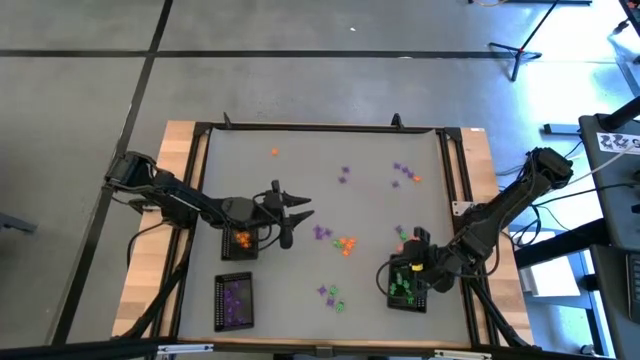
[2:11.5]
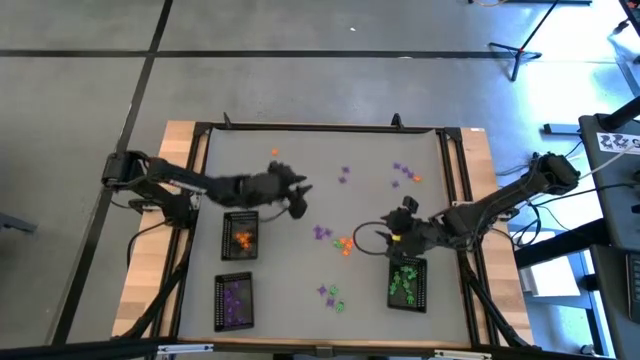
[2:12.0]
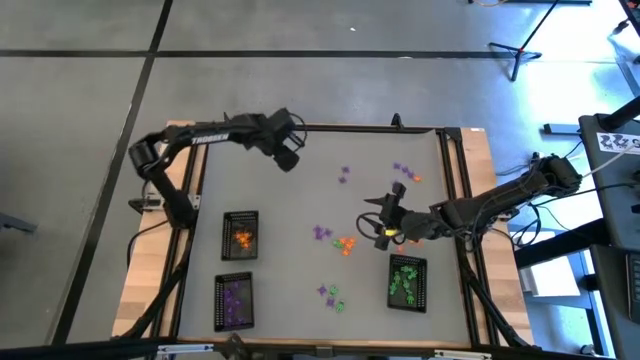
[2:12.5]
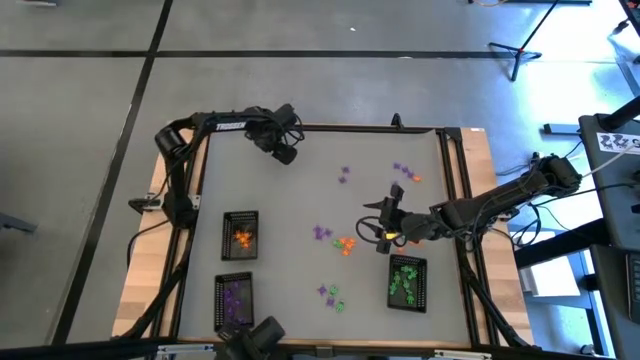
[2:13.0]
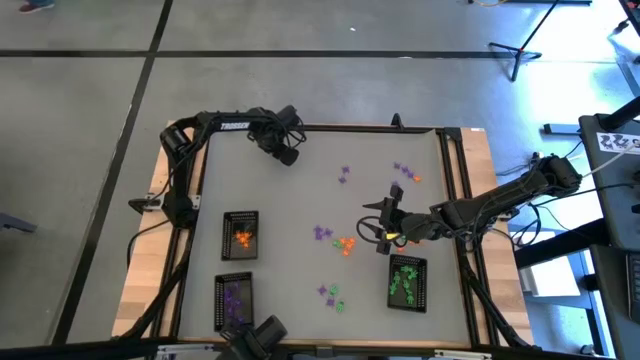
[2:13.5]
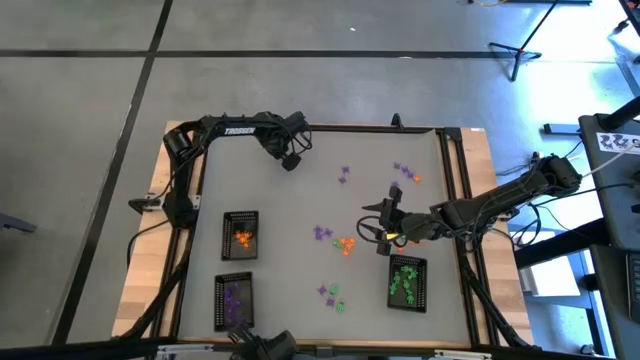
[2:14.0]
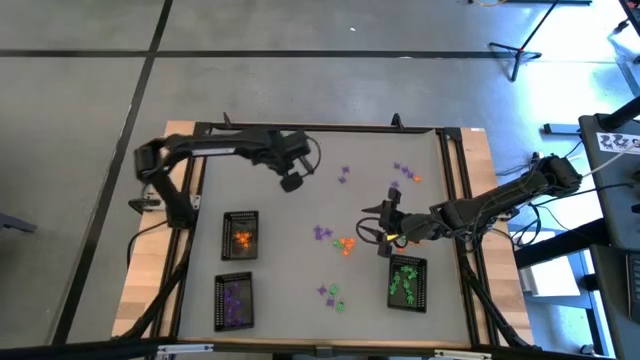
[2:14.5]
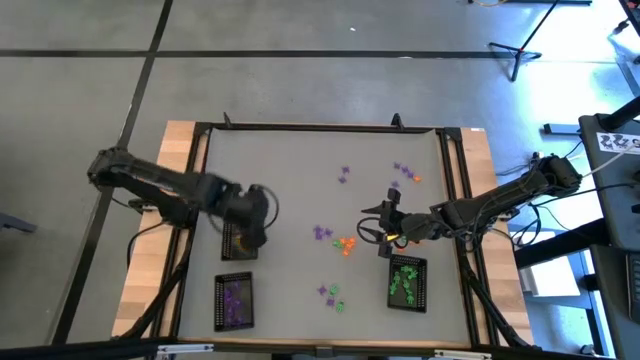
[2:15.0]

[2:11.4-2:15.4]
Task: Sort Halloween decoration
Put the orange spider toy into the top black basket

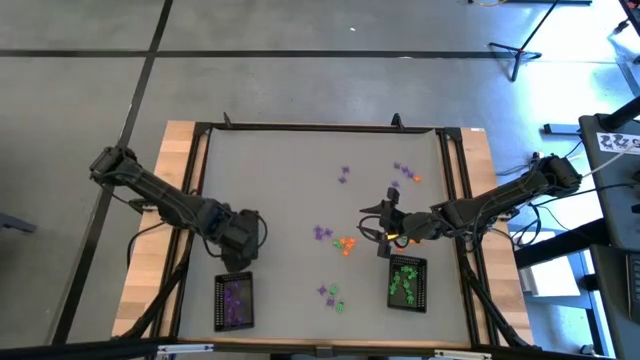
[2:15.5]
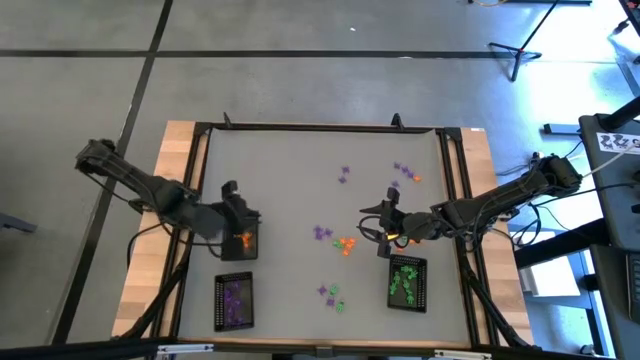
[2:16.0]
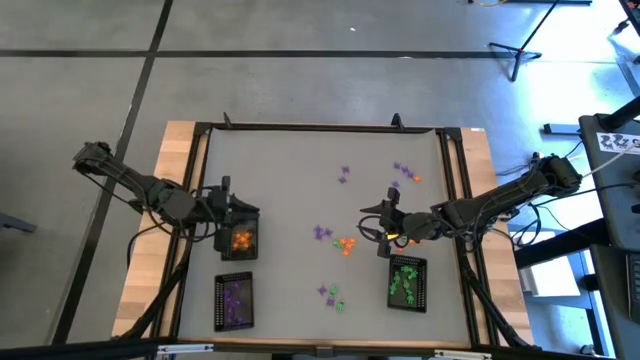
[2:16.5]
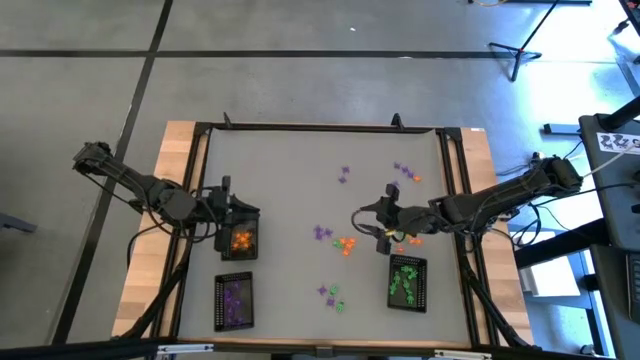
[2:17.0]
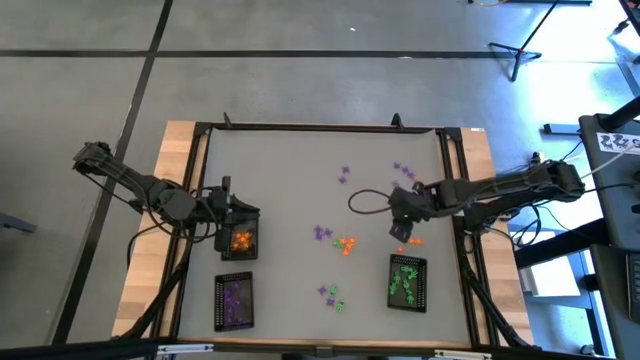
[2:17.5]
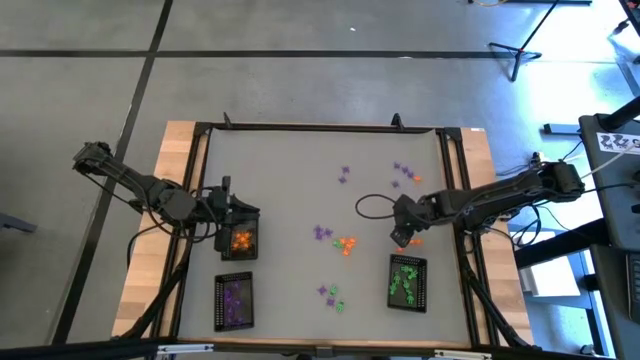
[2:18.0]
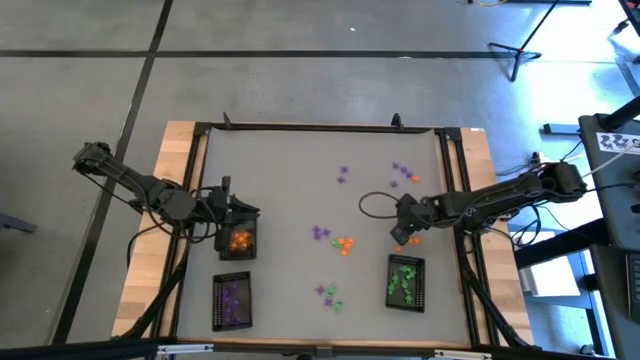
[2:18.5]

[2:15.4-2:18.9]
Put the purple spider toy into the bottom left black basket

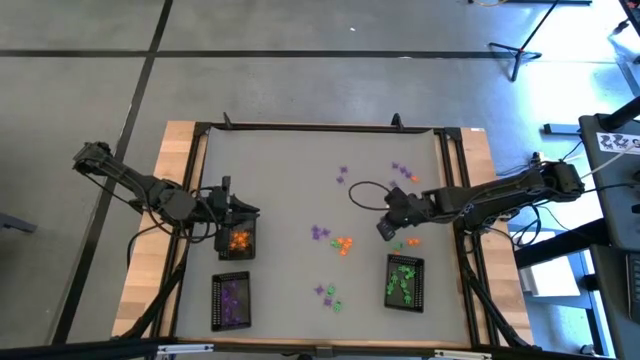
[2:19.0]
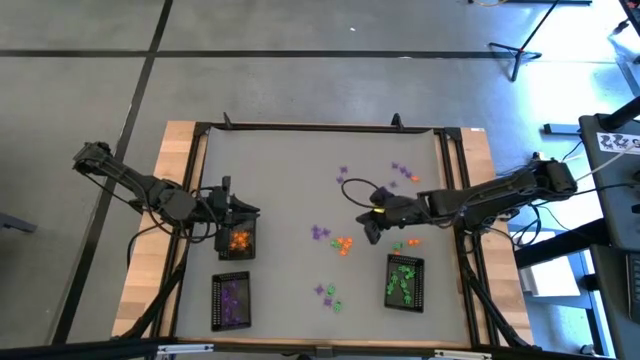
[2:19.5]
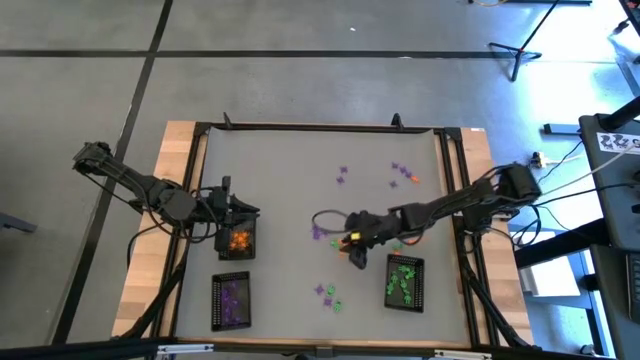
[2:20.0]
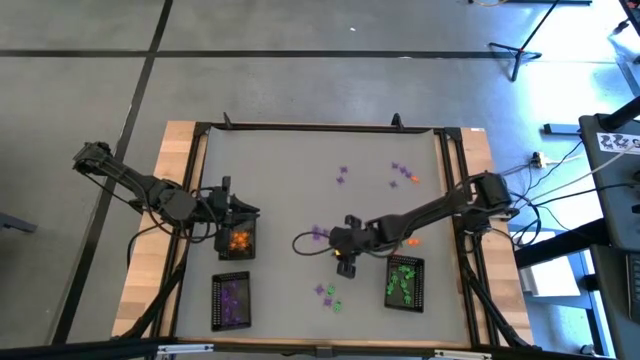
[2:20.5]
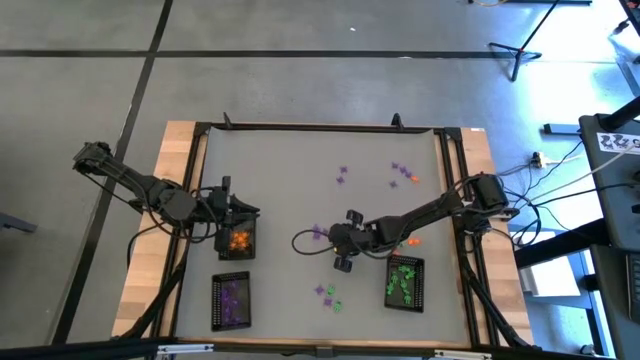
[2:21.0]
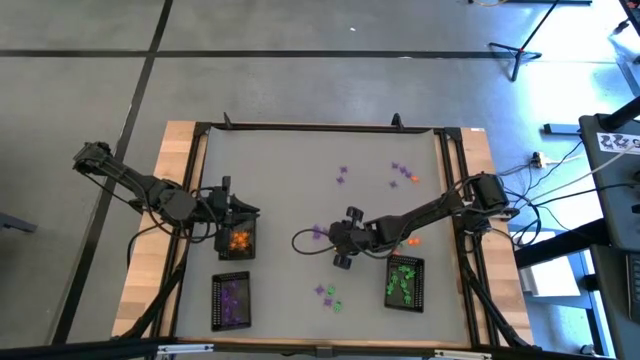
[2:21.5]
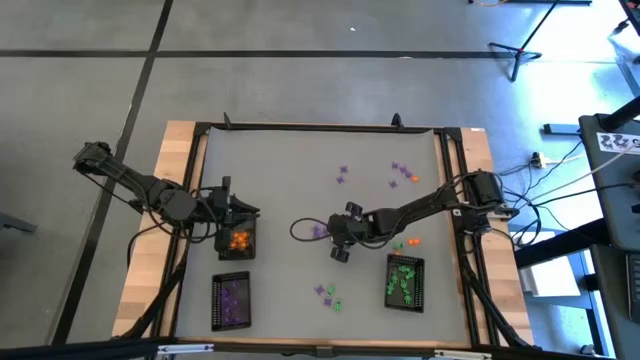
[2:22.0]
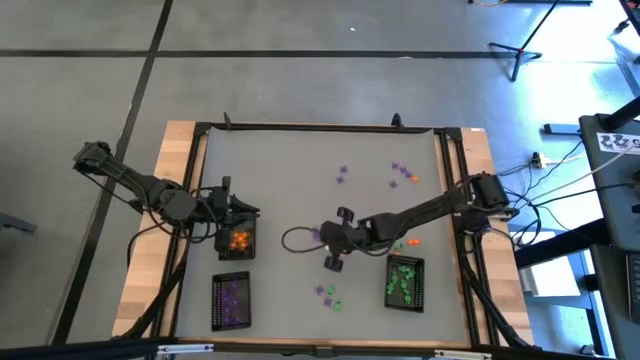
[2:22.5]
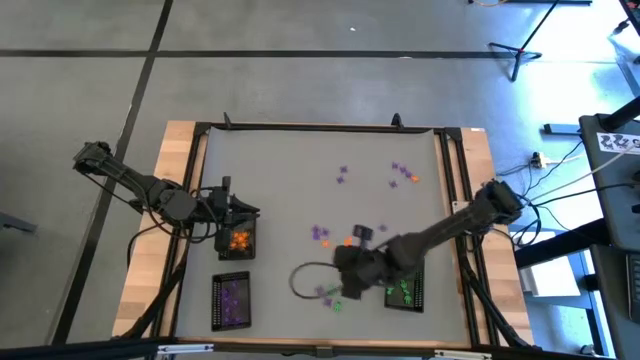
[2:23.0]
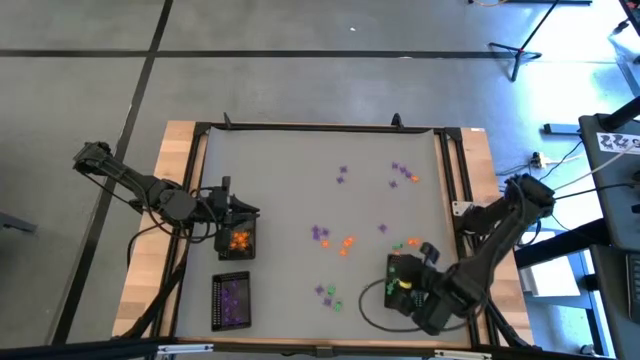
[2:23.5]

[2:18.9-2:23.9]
Put the green skeleton toy into the bottom right black basket

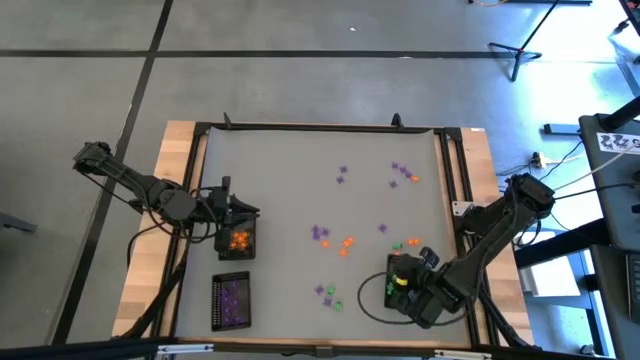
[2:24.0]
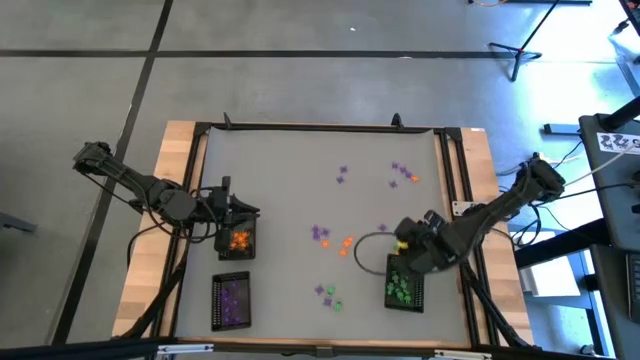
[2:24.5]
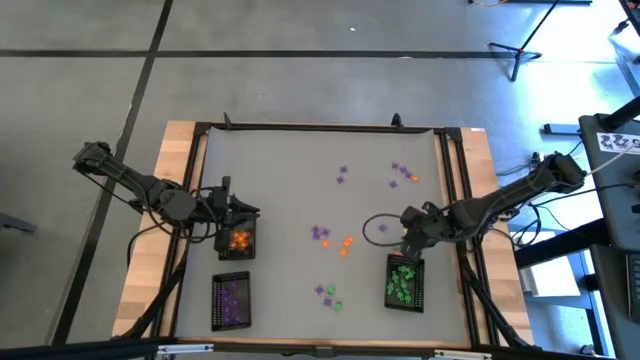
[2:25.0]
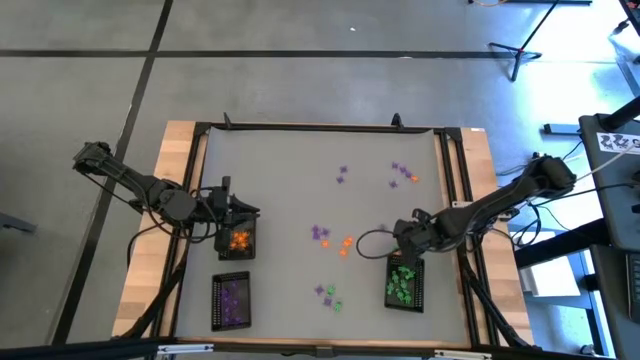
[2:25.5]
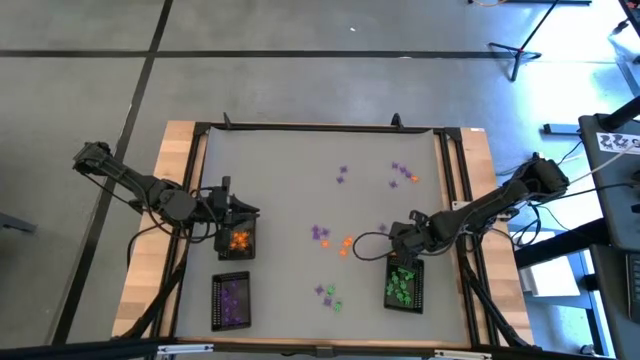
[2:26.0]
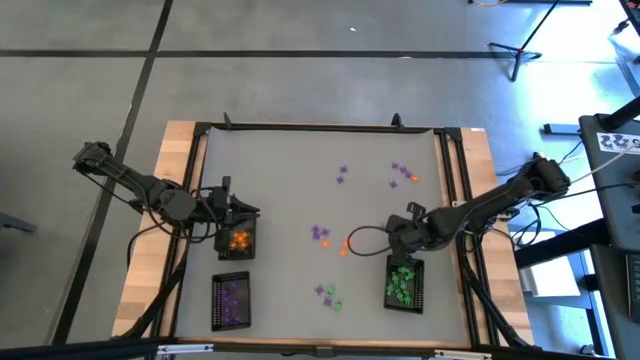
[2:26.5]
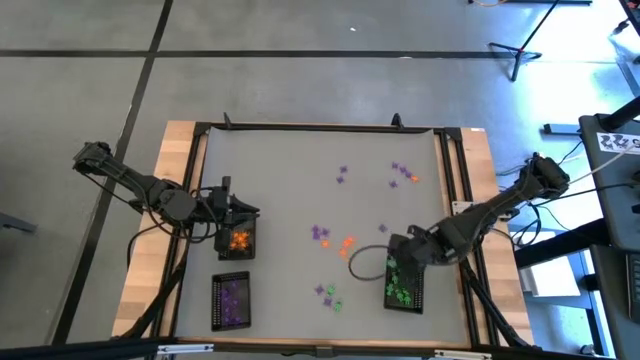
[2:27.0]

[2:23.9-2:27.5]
Put the green skeleton toy into the bottom right black basket

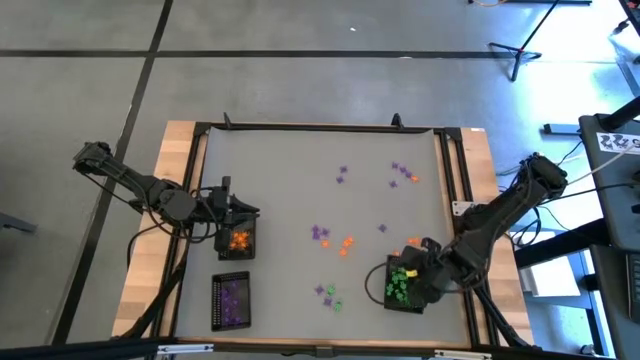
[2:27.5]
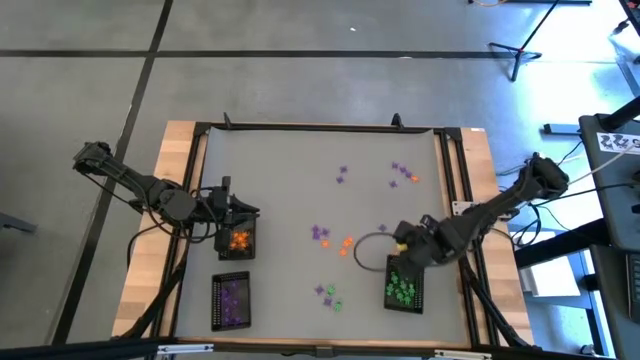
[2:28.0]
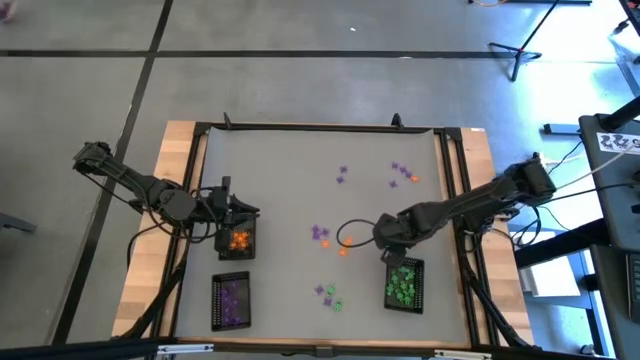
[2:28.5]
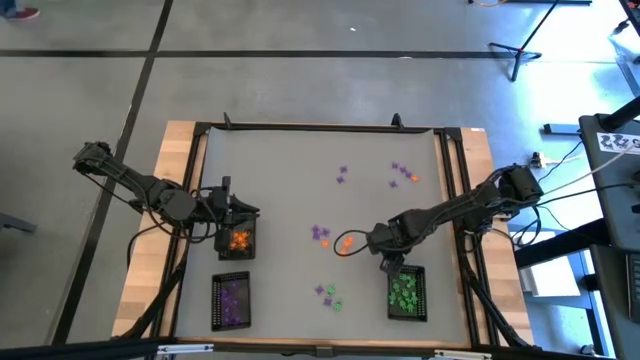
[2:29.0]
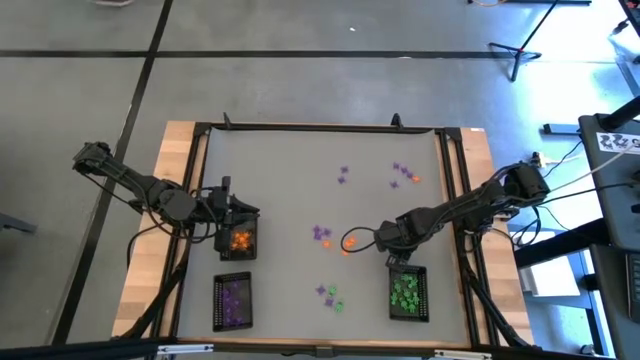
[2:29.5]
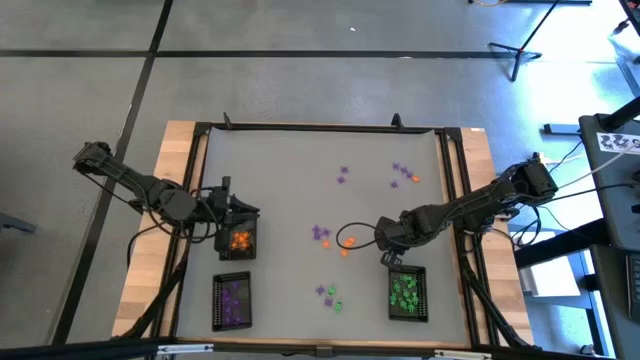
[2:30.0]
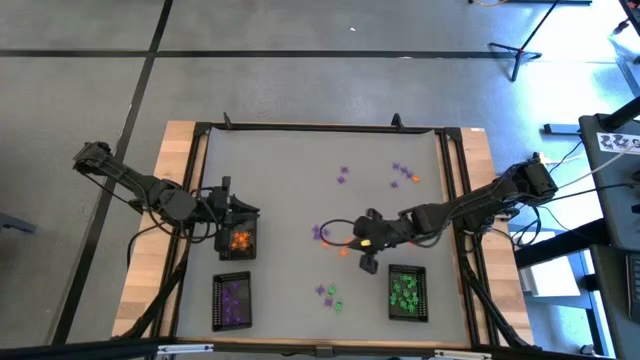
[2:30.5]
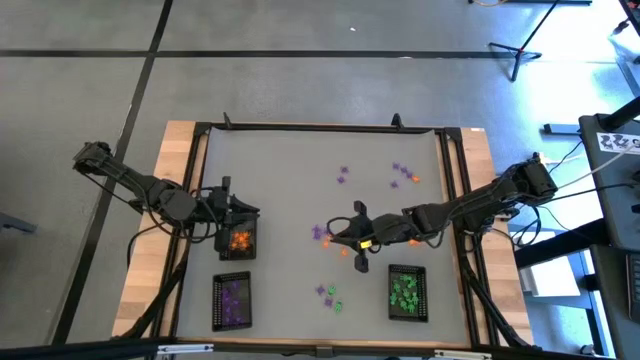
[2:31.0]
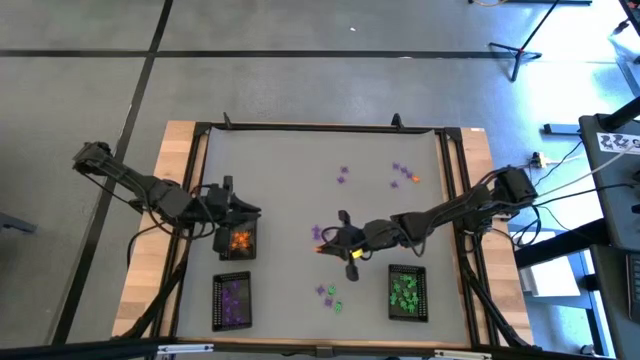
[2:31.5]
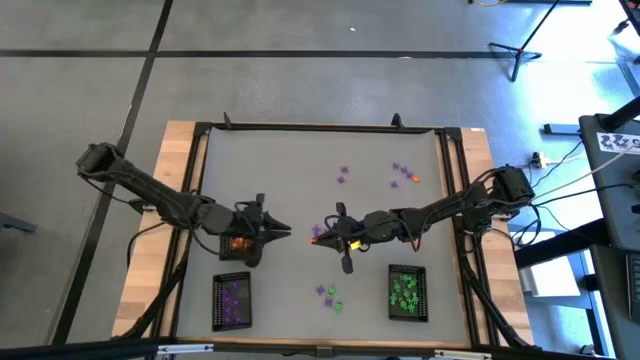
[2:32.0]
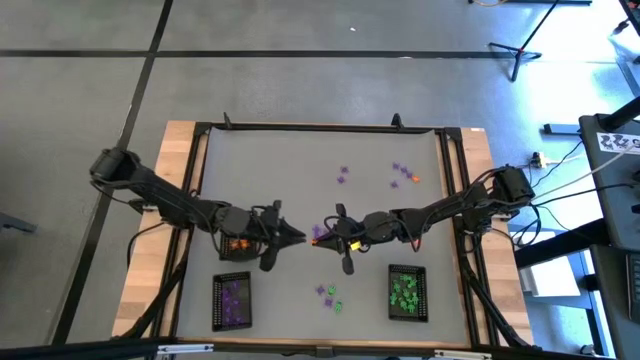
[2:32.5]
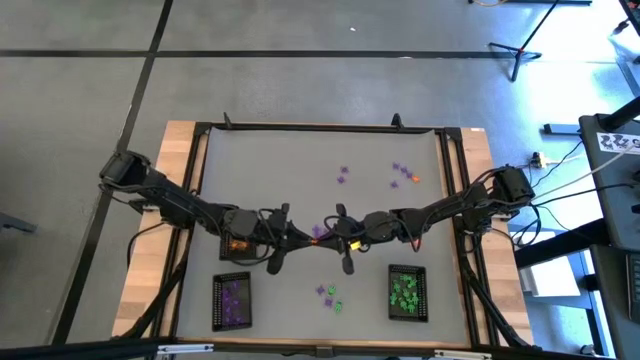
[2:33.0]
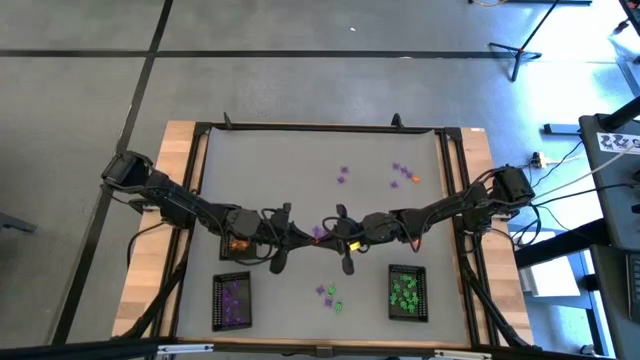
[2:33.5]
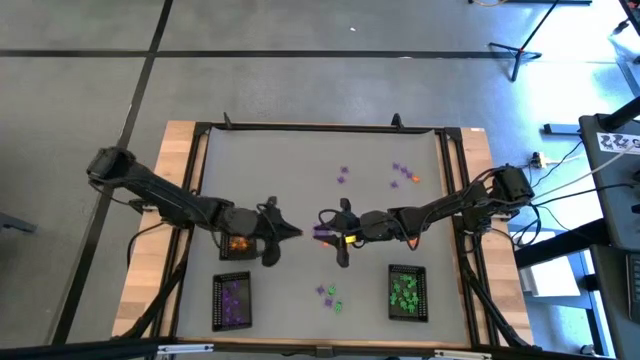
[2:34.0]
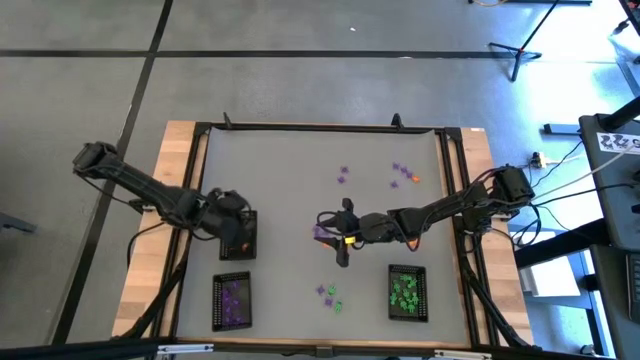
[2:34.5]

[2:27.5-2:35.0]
Put the orange spider toy into the top black basket
